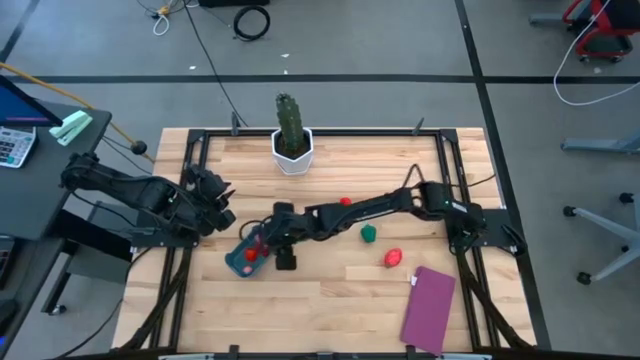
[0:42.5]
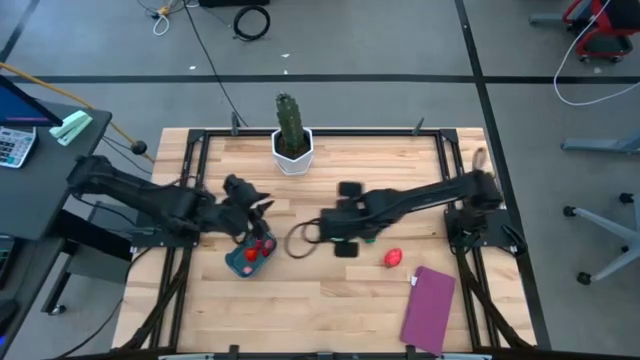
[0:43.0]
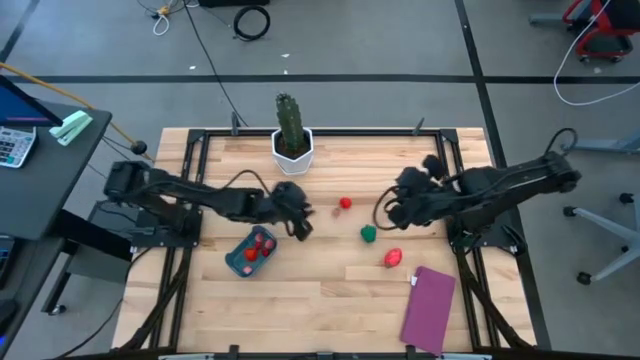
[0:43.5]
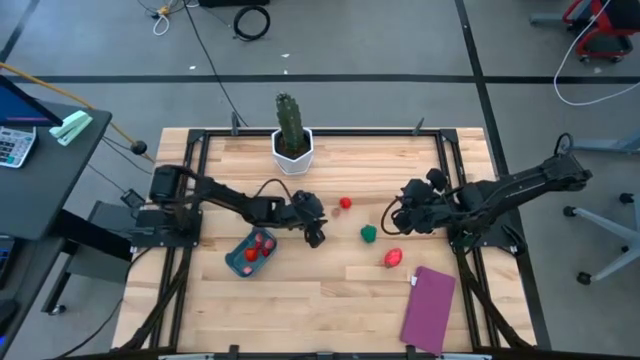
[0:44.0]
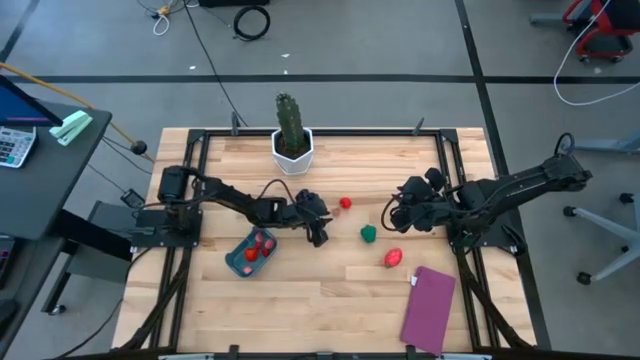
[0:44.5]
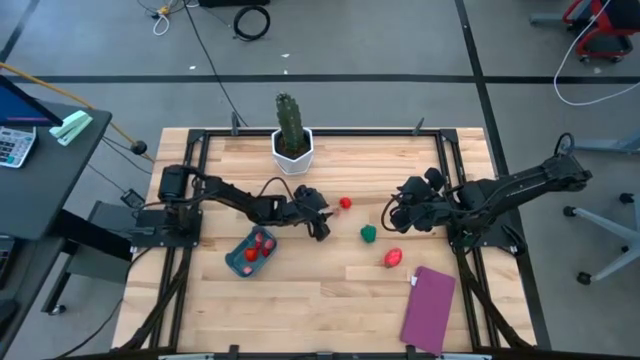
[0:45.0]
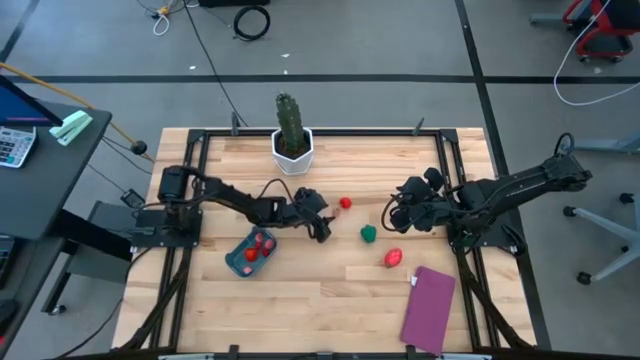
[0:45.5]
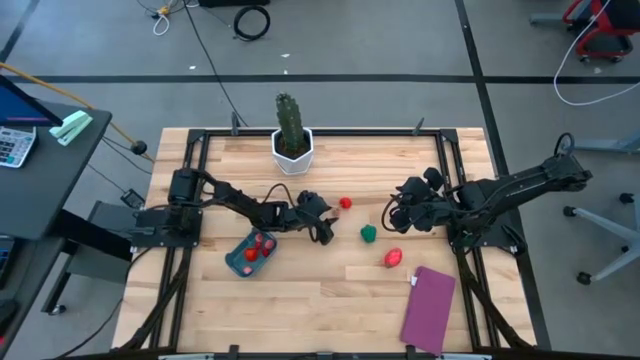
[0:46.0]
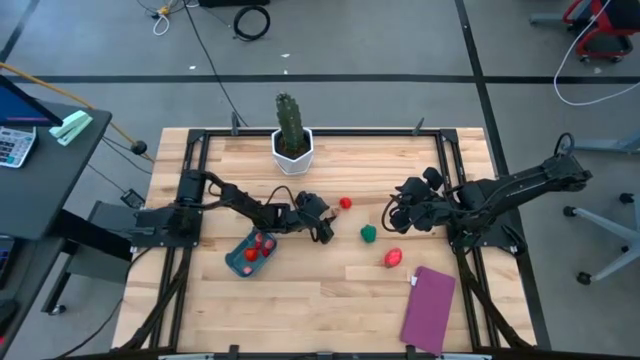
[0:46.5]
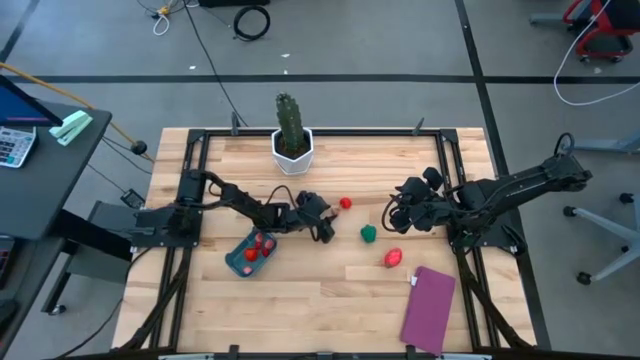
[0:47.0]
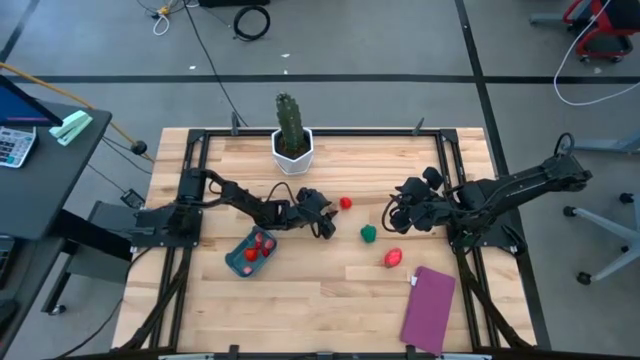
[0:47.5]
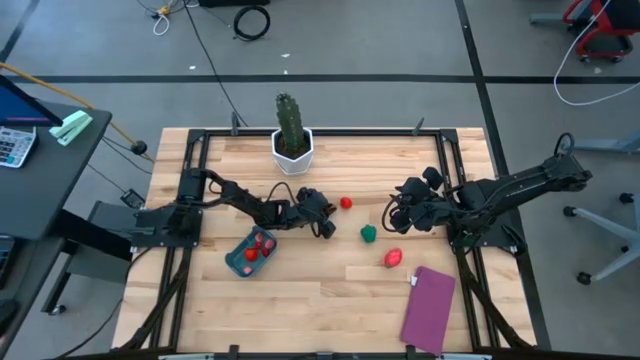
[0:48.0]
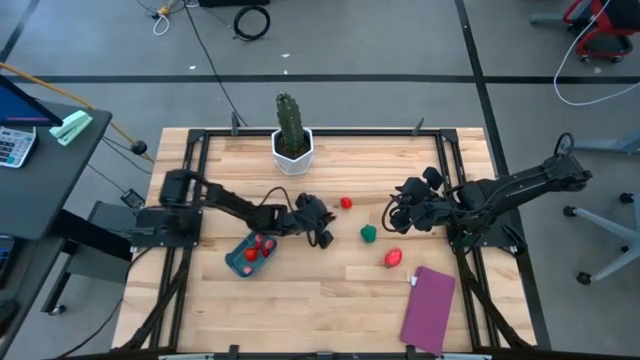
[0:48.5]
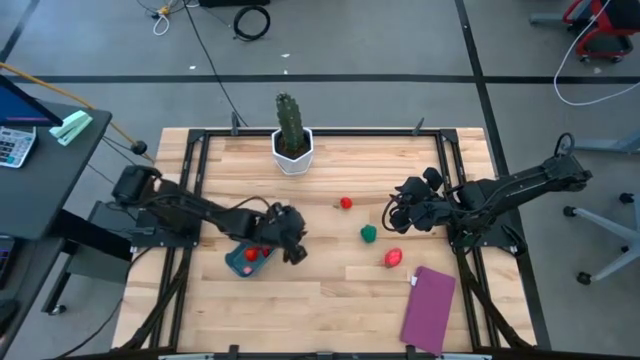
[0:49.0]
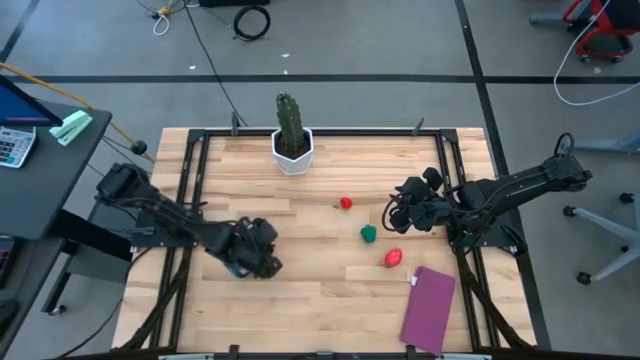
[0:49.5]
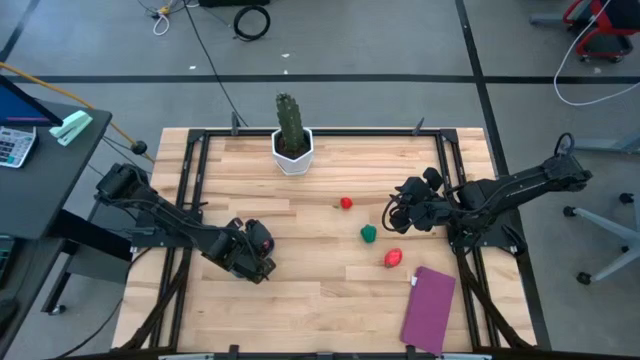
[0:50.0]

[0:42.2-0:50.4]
Task: Pick and placing Produce into tupperware
Put the pink peach into the blue bin

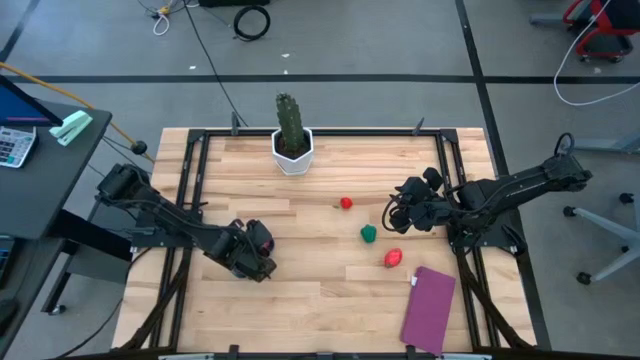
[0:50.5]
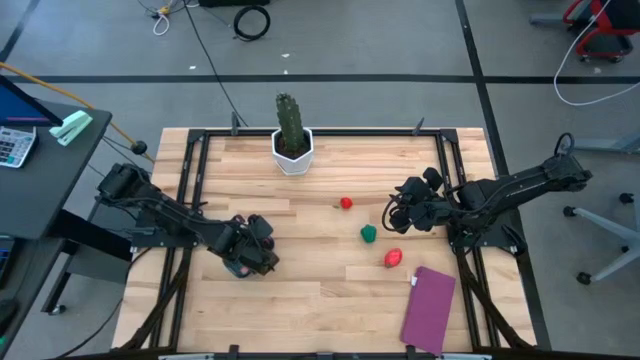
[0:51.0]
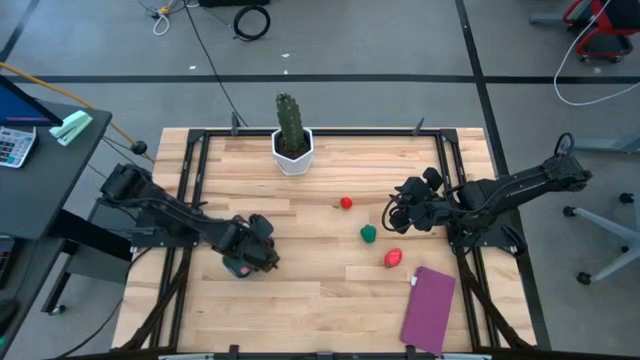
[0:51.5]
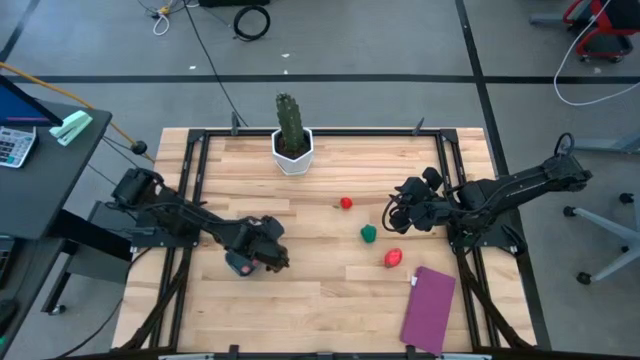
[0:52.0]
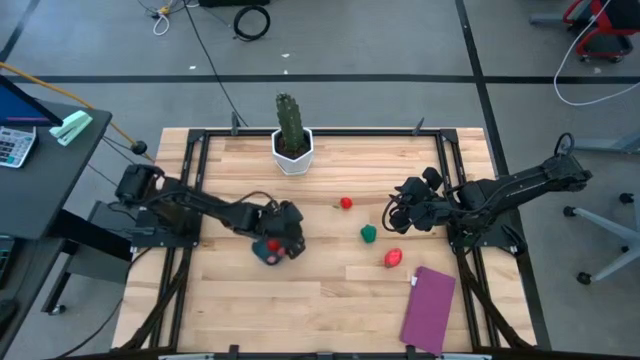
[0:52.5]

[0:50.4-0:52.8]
Adjust the blue bin

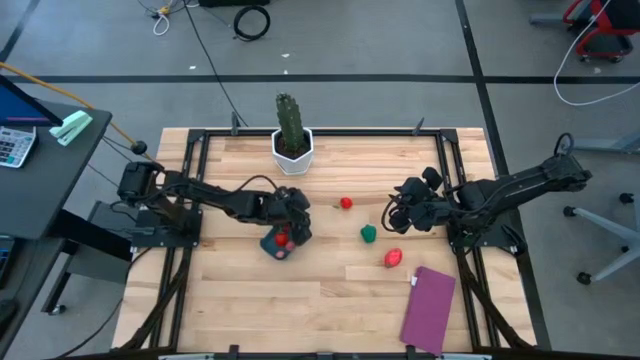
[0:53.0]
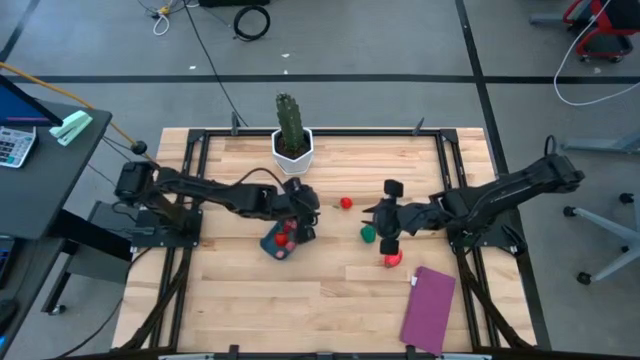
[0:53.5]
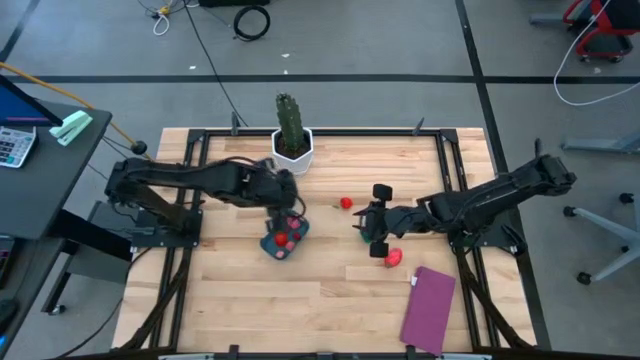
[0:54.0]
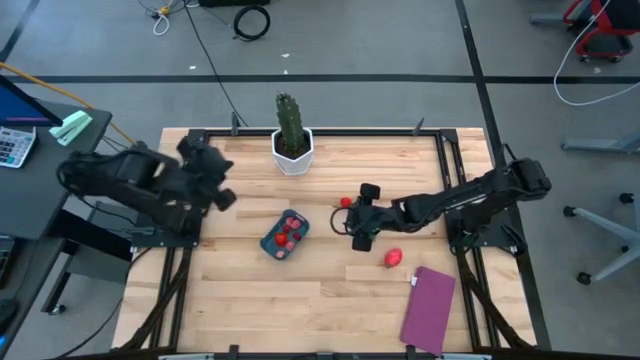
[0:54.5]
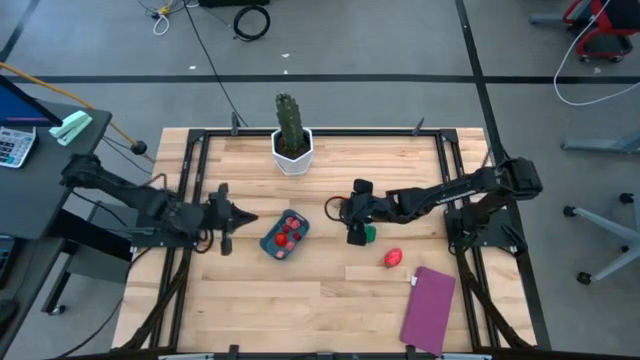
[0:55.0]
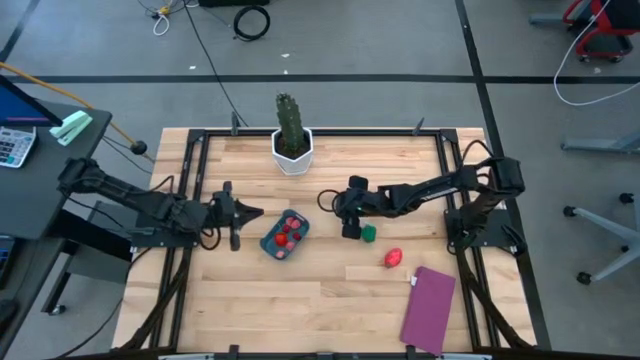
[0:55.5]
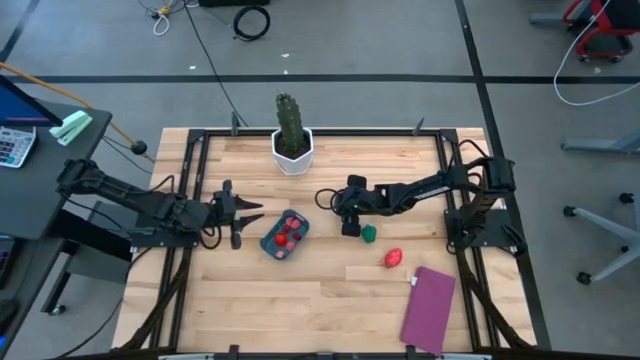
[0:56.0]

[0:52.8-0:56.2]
Put the red strawberry into the blue bin

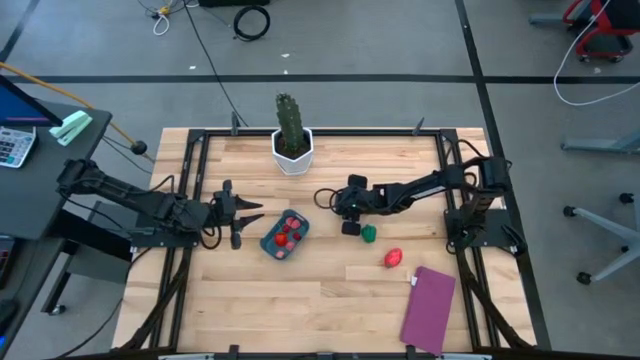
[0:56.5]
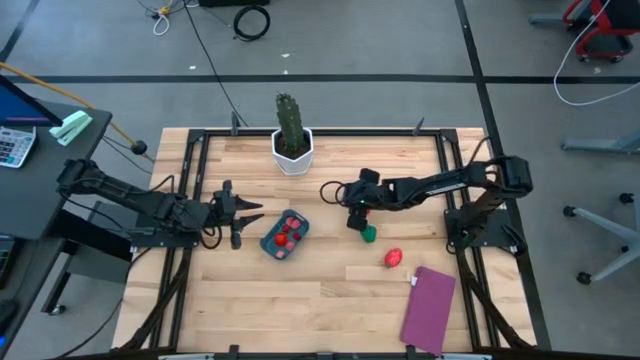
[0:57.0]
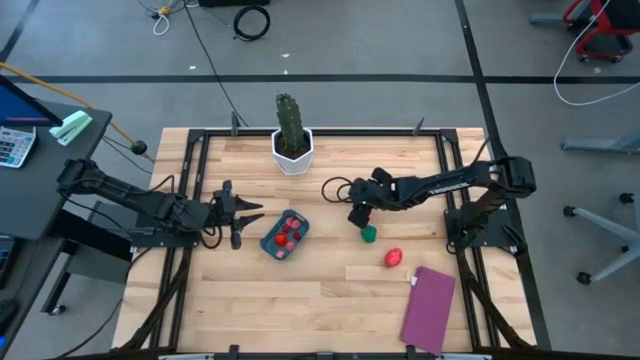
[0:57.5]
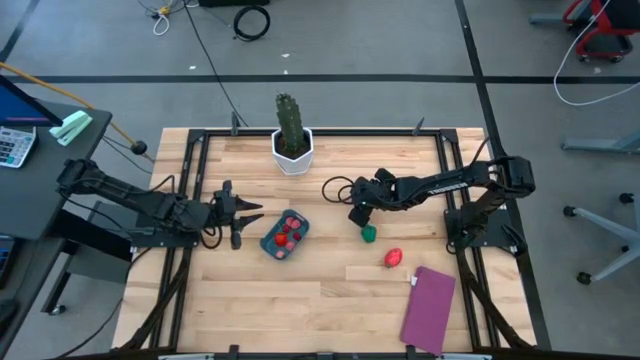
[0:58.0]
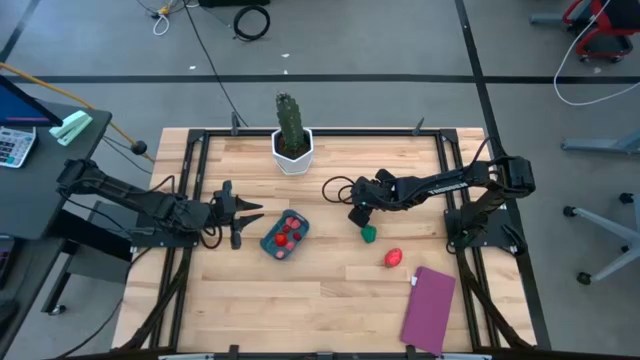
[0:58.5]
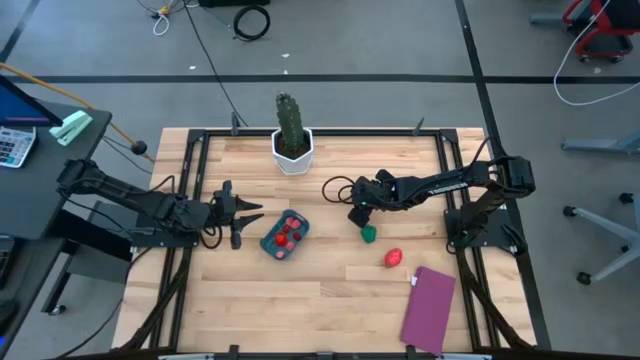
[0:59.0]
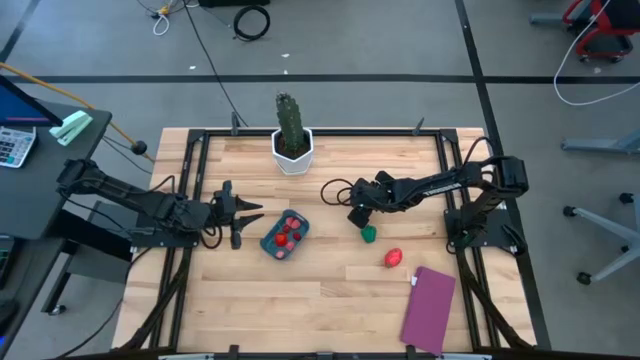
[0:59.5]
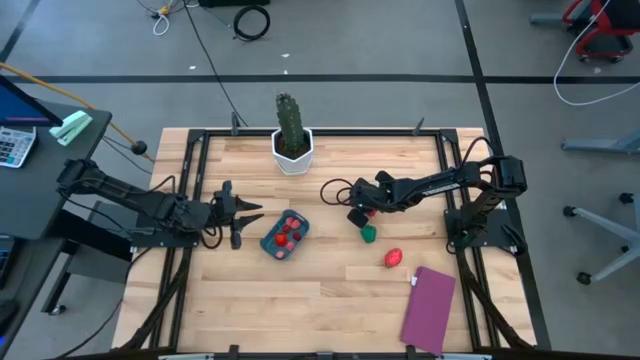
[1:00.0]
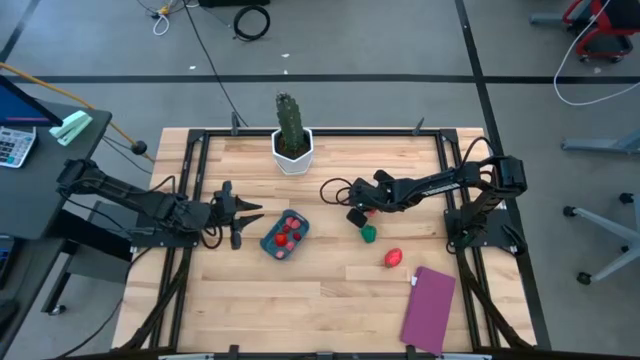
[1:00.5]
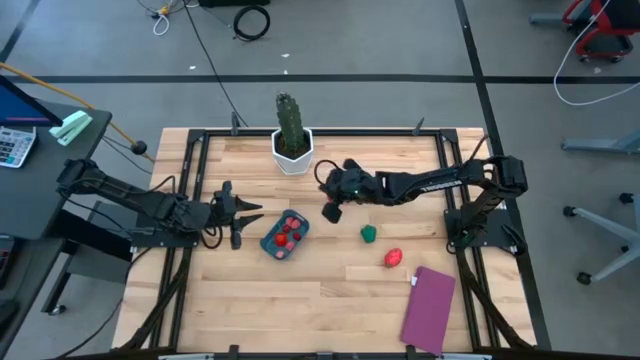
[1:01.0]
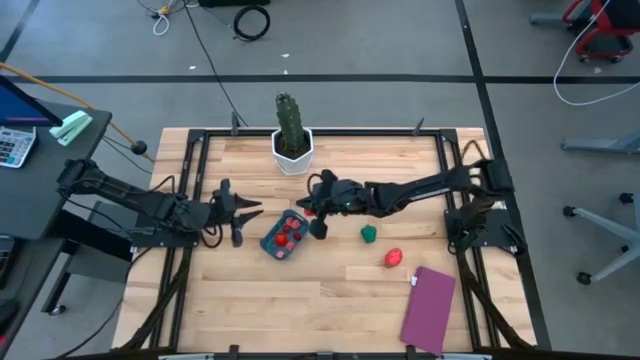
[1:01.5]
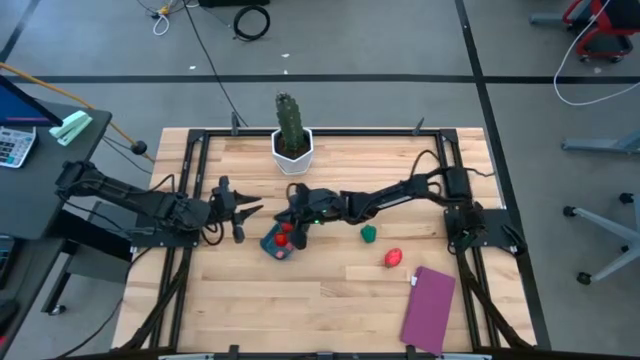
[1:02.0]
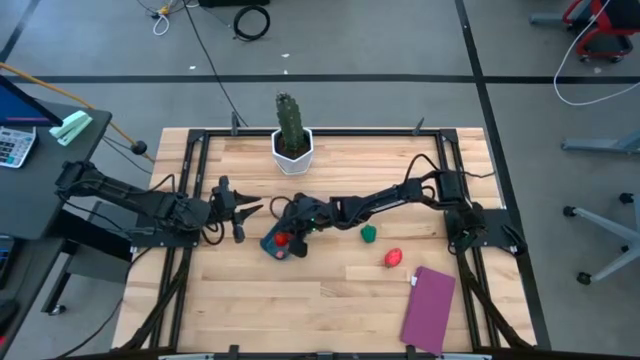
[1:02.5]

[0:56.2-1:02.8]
Put the red strawberry into the blue bin

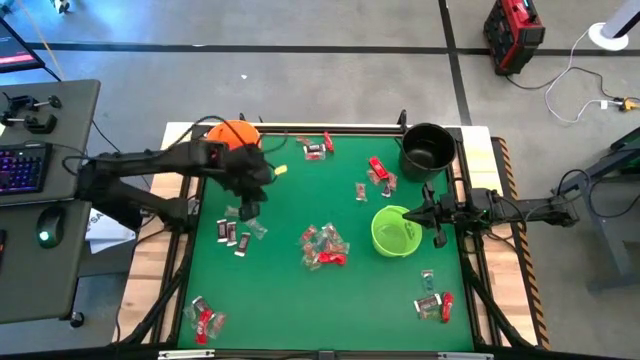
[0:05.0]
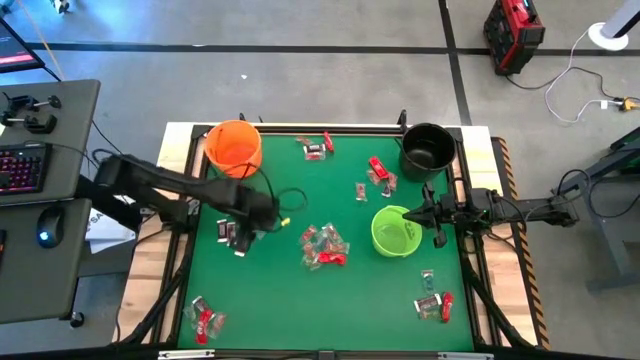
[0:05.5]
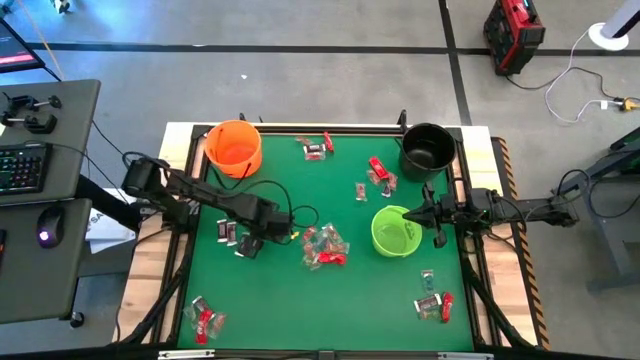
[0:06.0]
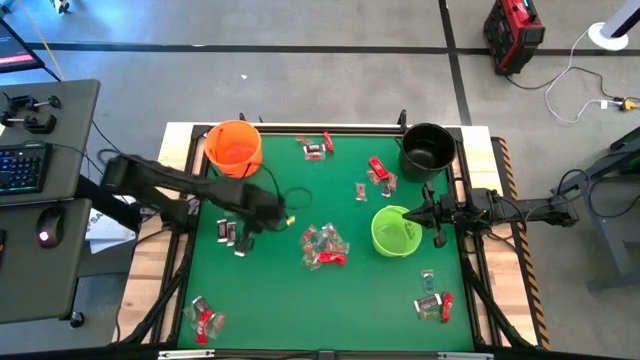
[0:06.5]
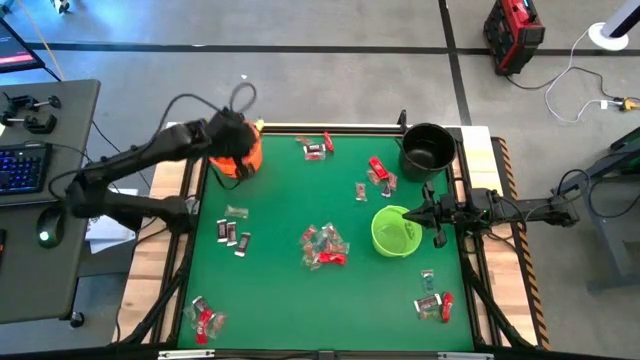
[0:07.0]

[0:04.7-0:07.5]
Task: Sort candy by brand, put in halloween buckets
Put the blue gummy into the orange bucket
